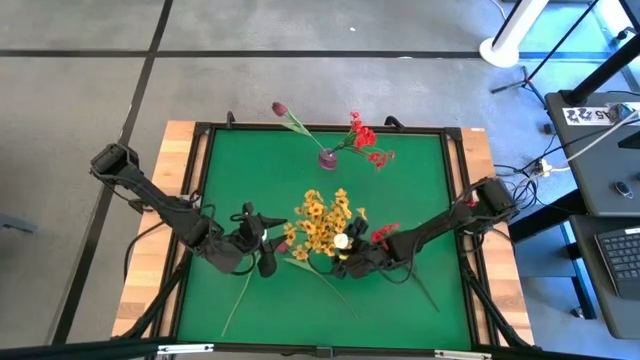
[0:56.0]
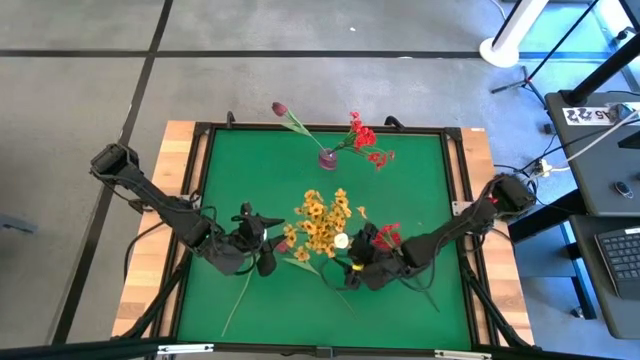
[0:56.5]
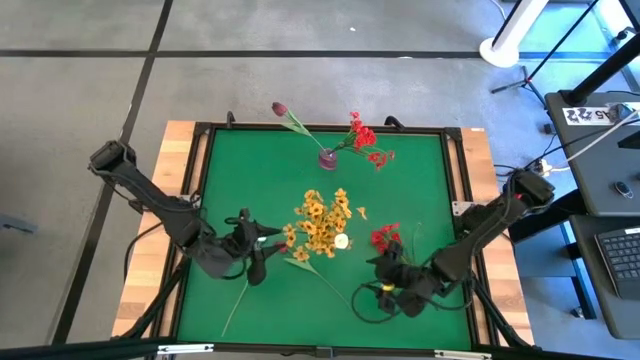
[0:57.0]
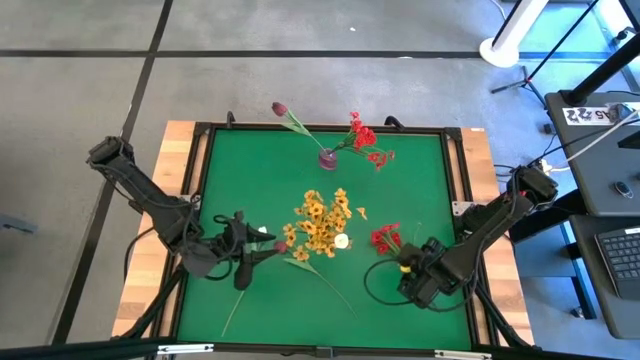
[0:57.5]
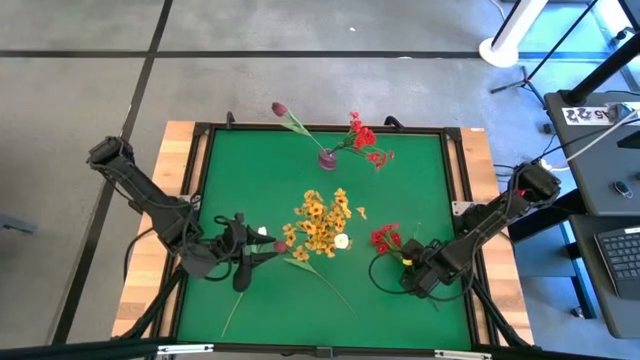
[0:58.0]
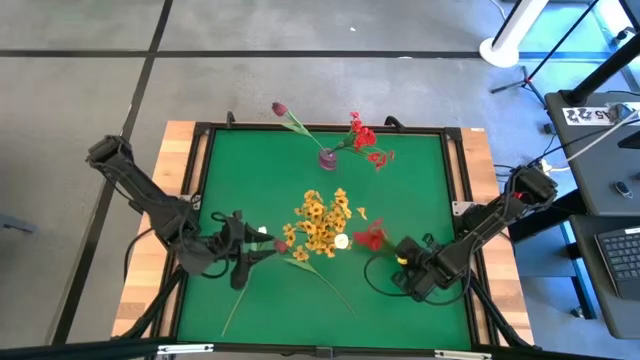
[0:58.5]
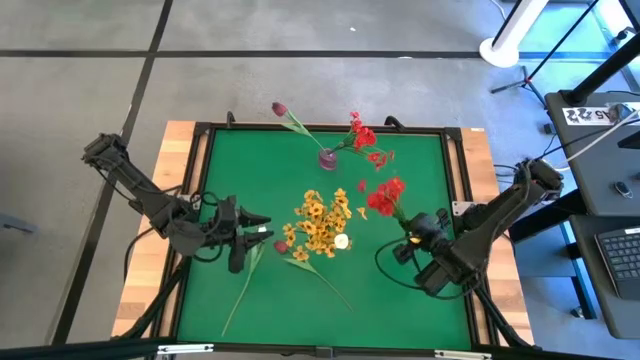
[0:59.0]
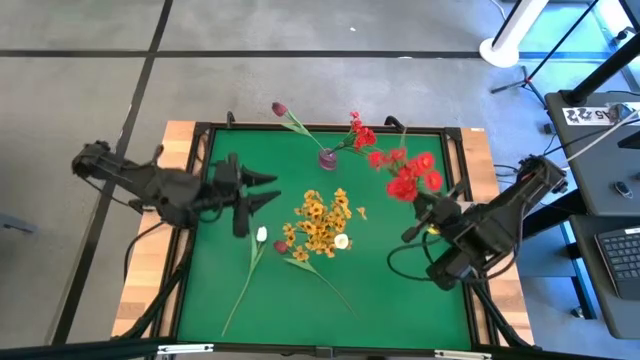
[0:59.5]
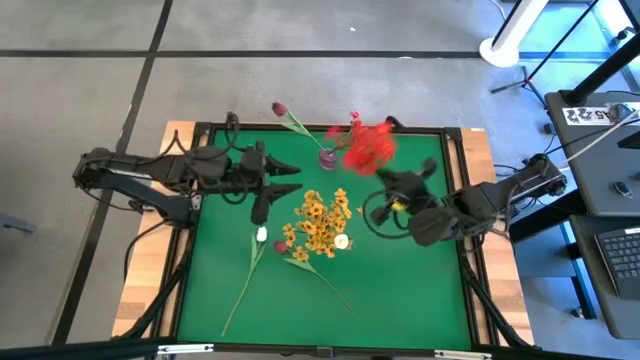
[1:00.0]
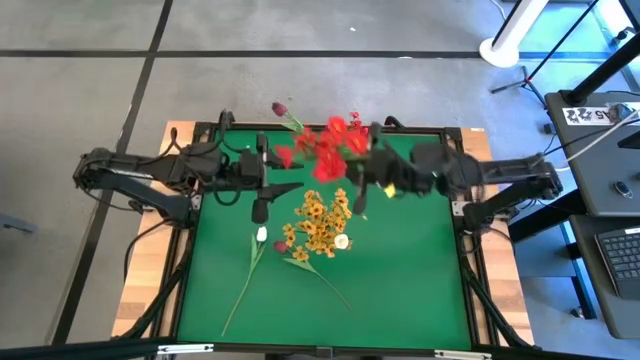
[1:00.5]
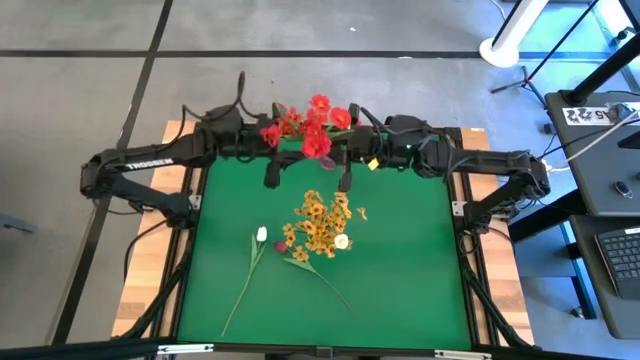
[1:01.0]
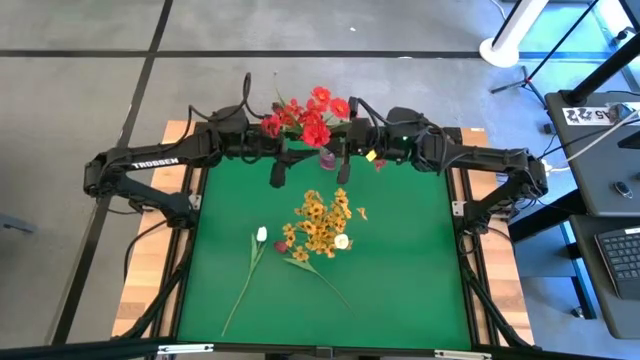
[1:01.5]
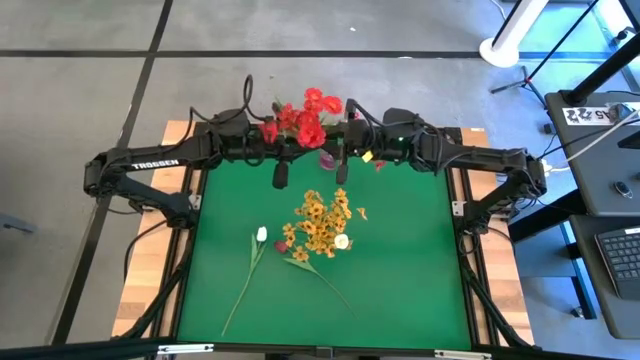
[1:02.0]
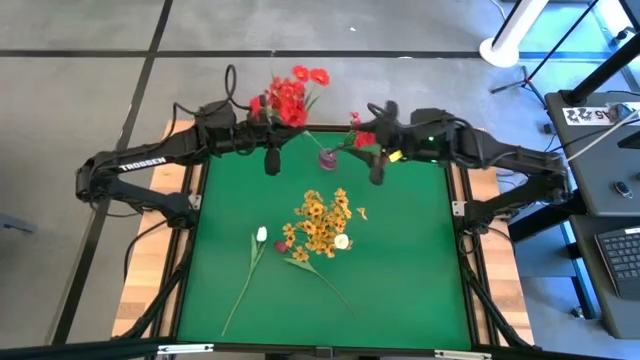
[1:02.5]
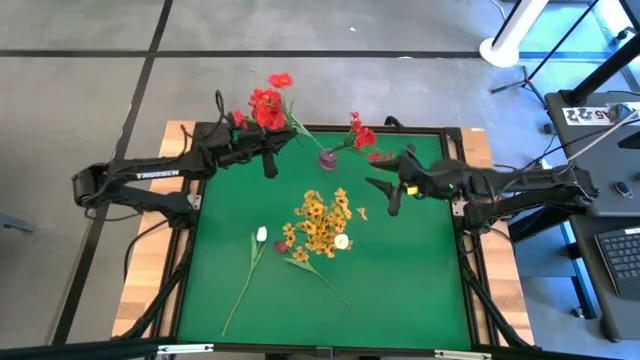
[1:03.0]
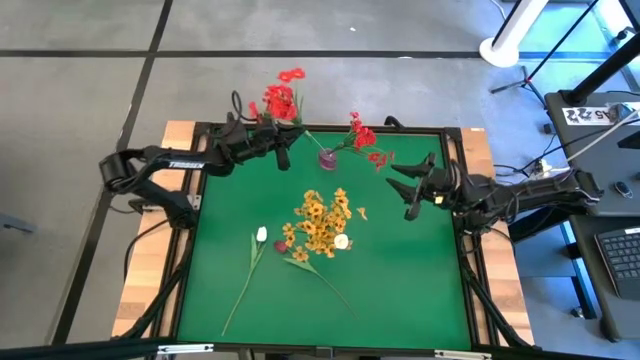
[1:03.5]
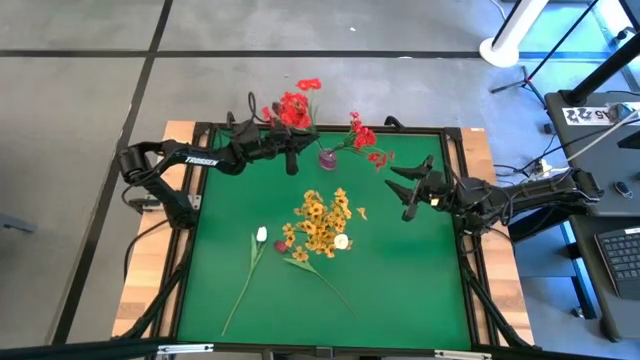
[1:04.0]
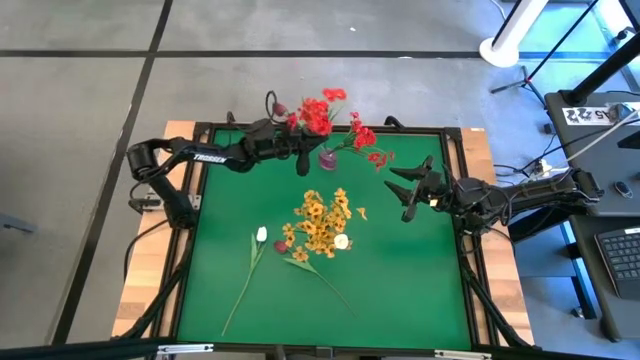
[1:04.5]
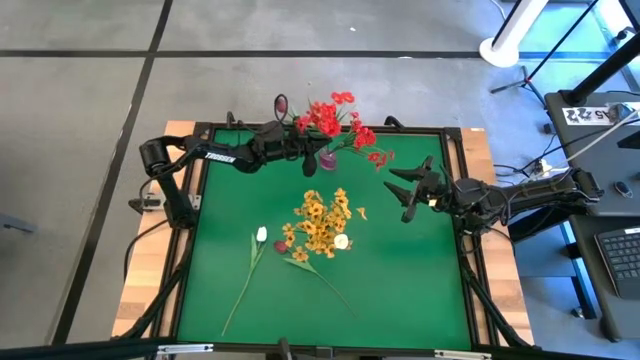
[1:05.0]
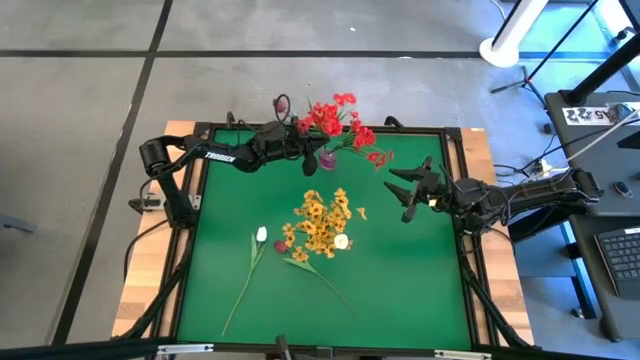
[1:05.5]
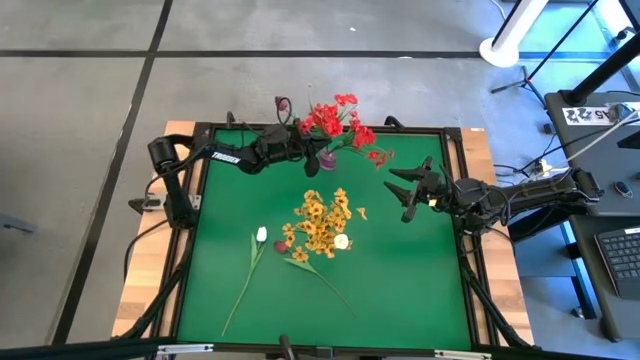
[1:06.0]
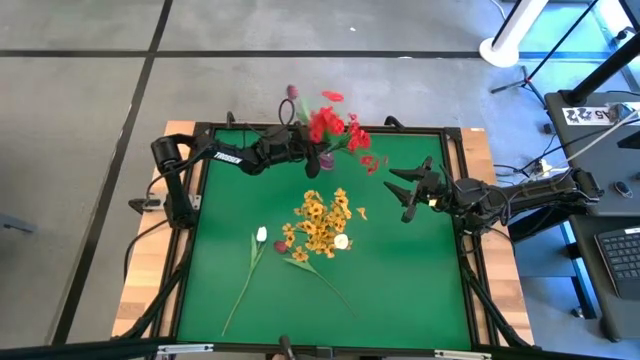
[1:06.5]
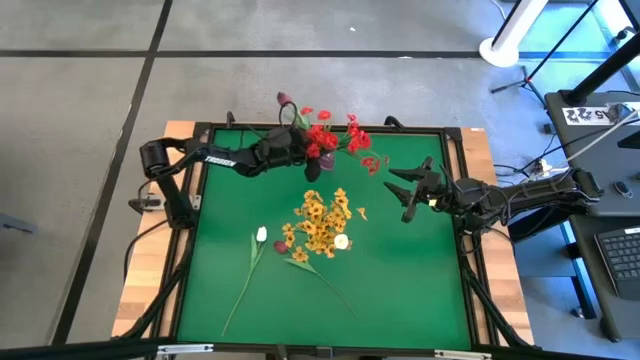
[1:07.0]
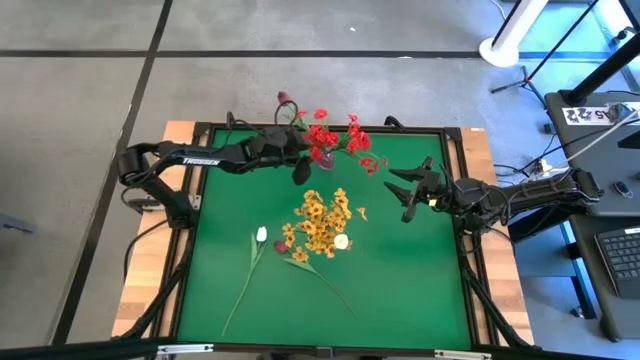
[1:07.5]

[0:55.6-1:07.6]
Task: Sort flowers into vase by color
Put the red flowers into the purple vase

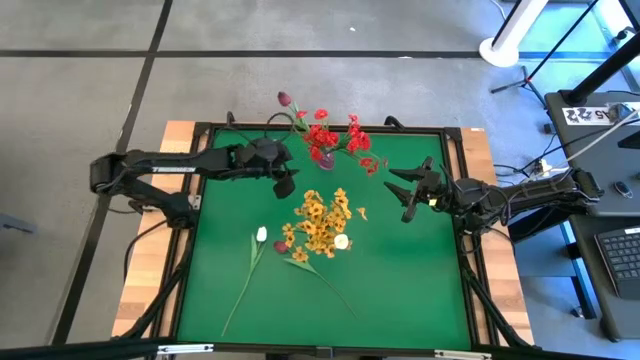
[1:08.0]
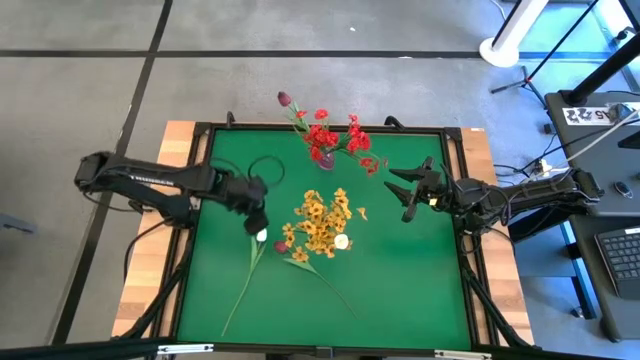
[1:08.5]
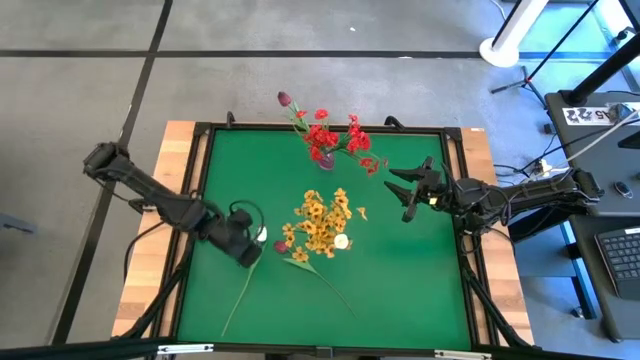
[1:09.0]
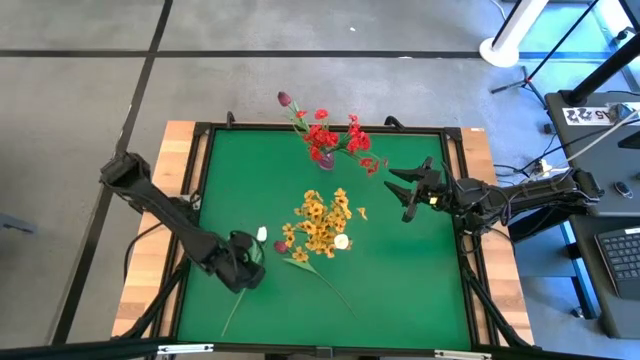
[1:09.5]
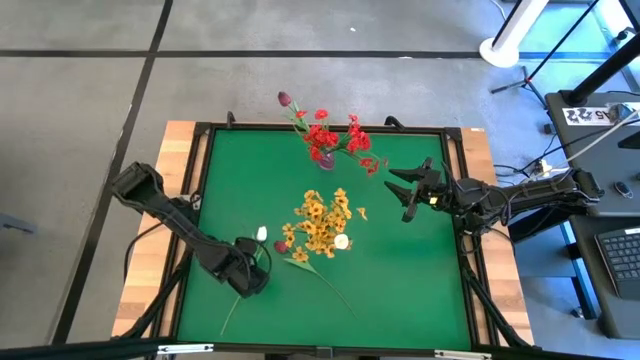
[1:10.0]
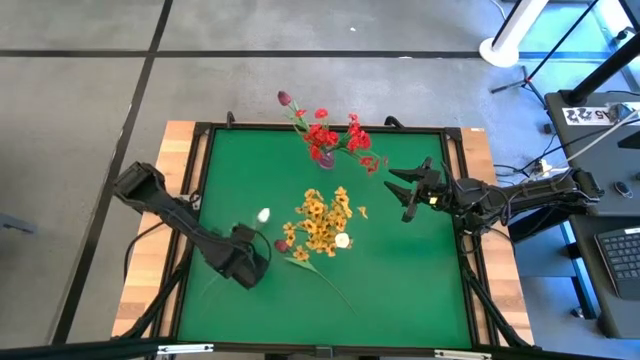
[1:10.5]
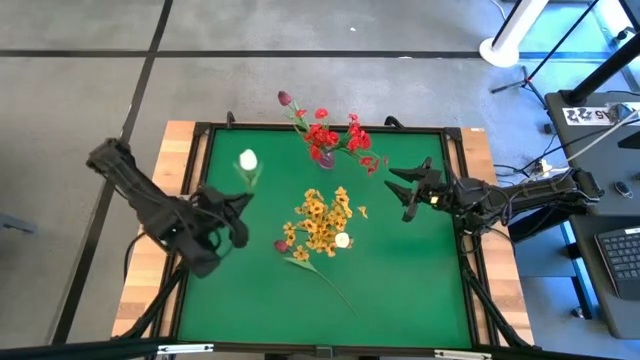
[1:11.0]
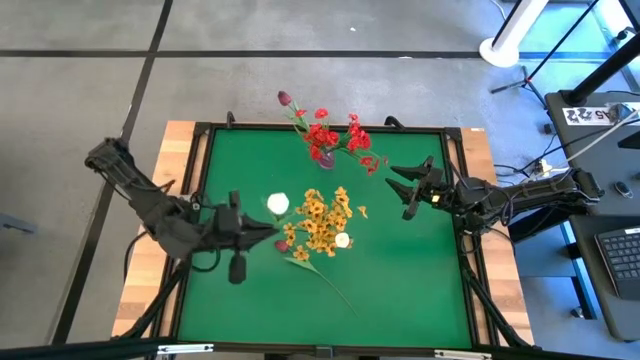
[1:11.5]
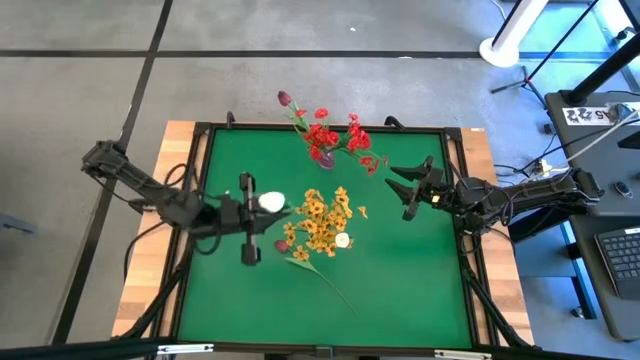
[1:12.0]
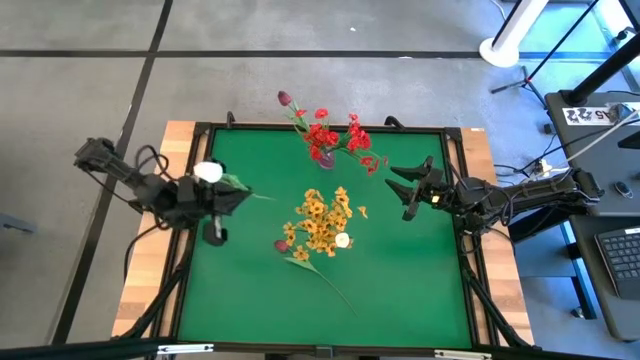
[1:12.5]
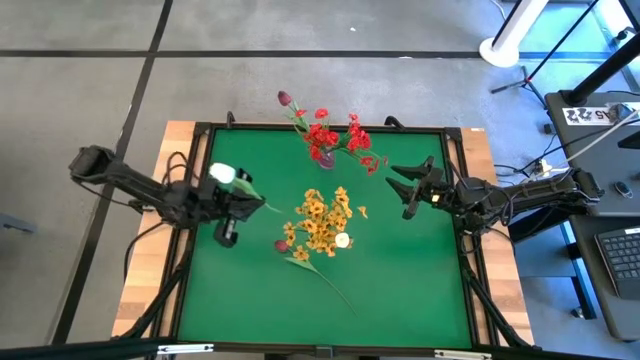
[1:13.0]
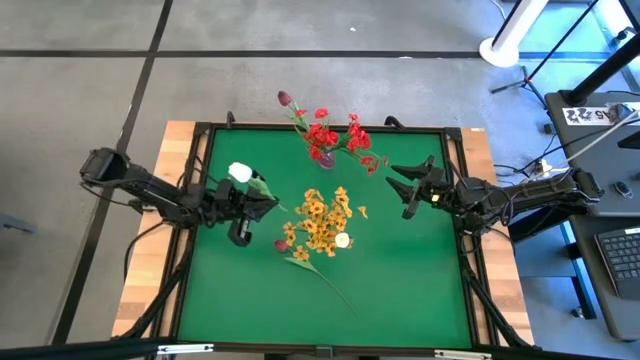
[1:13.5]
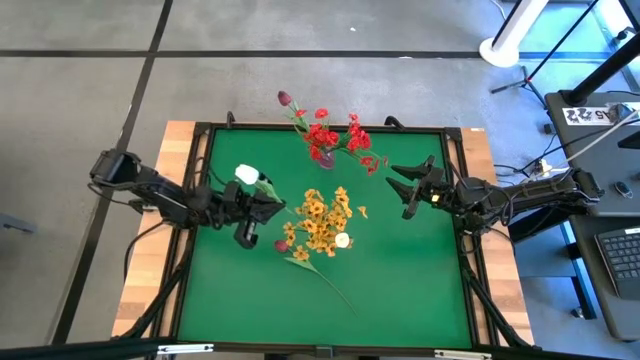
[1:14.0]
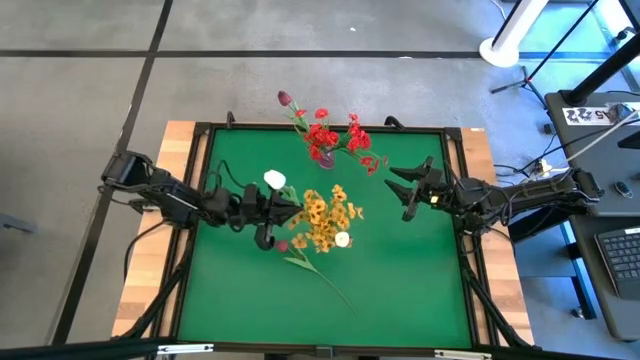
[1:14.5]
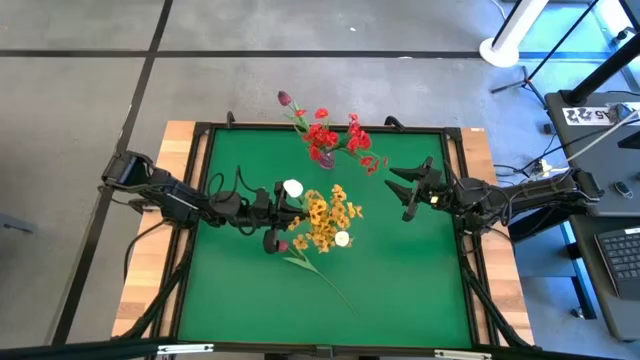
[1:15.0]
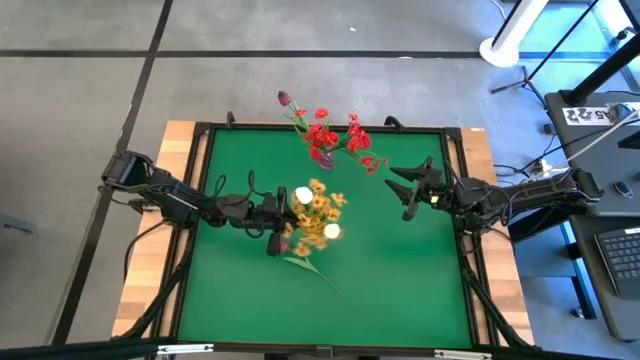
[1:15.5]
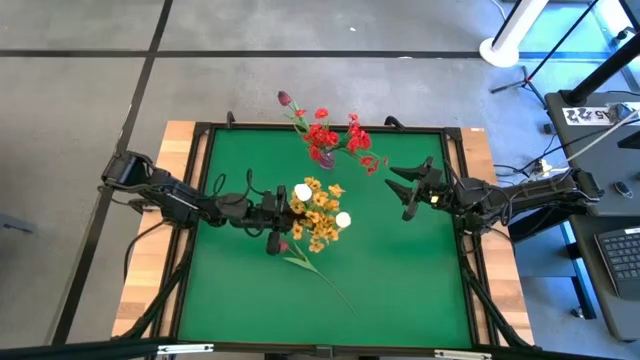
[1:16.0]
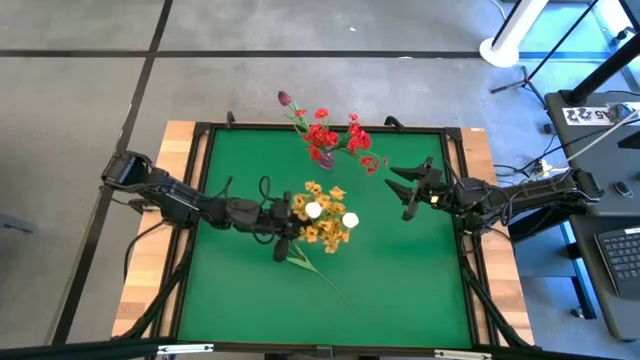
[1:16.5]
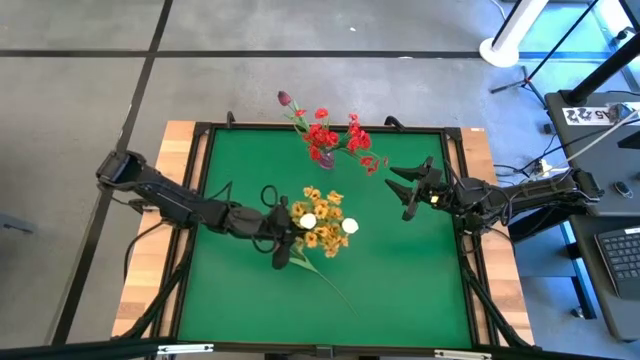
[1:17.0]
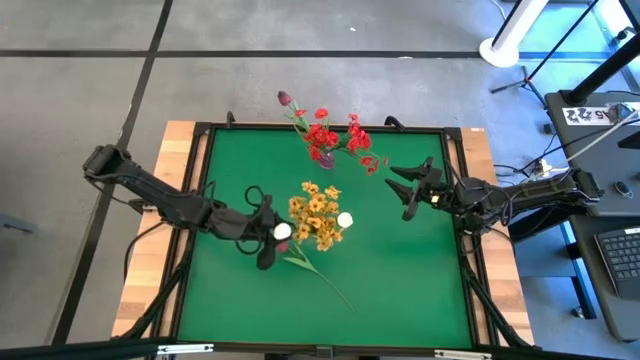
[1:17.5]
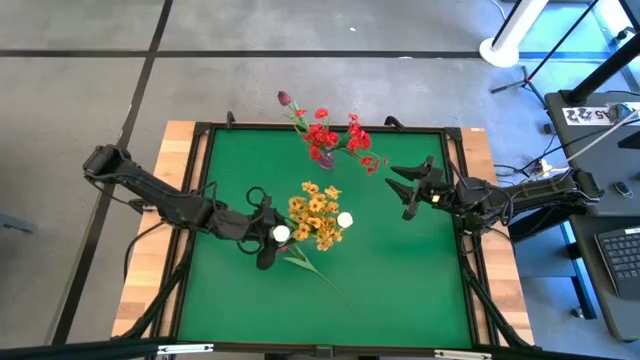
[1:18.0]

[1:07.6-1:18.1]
Put the white tulip into the transparent vase
